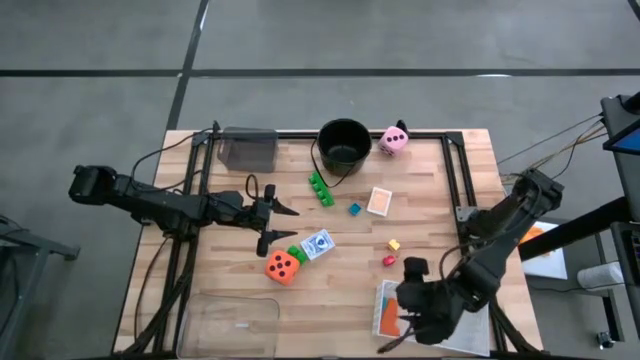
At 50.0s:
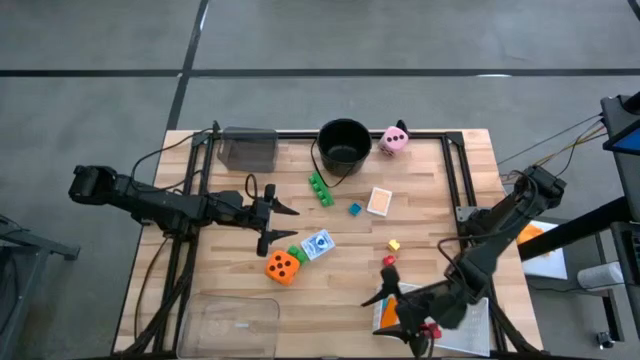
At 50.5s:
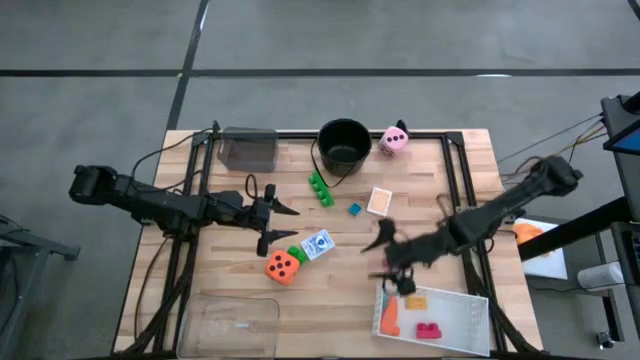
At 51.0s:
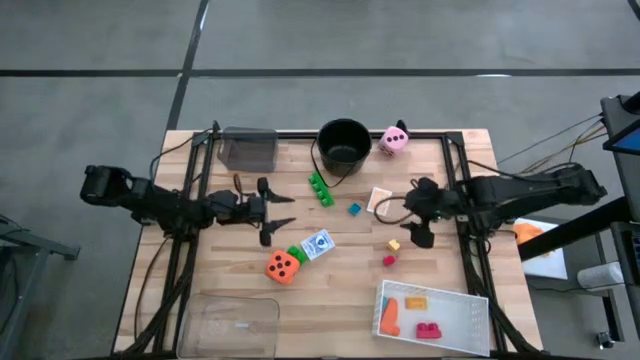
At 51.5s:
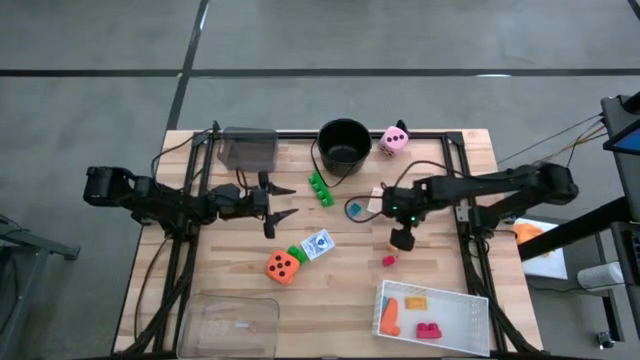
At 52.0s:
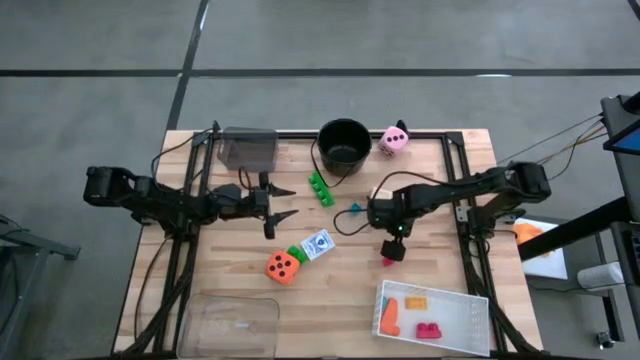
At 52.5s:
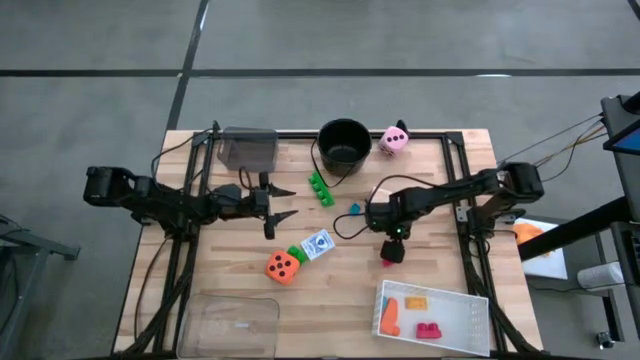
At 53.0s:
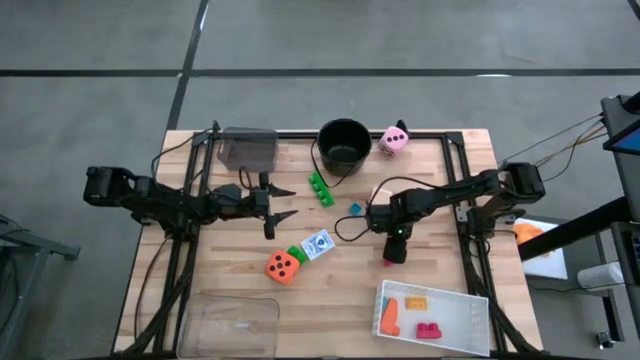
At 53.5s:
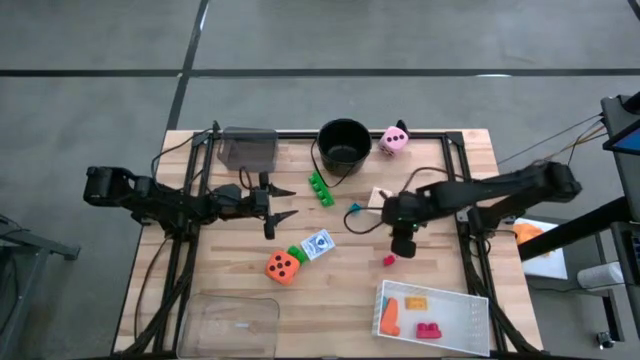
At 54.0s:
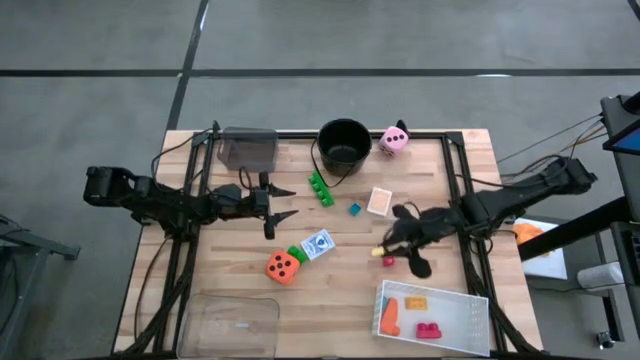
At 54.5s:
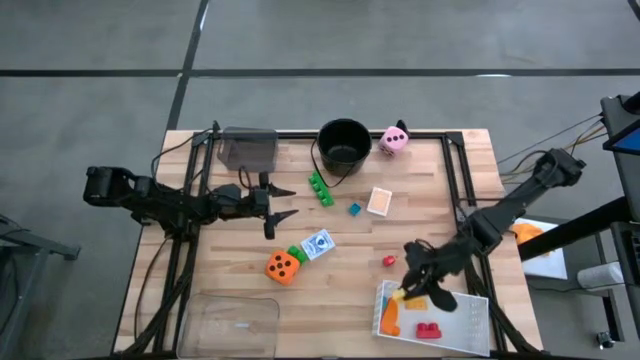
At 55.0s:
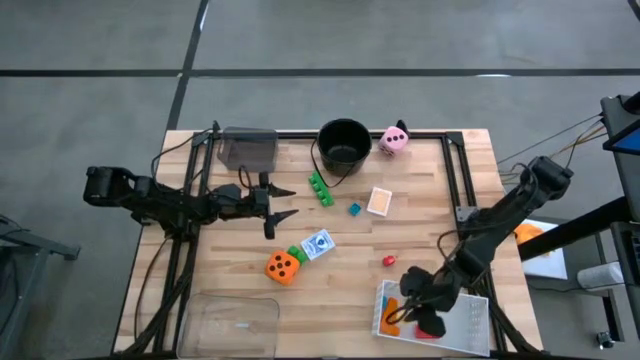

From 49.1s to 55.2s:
Task: Pick & Place Toys
Put the light yellow game piece into the white bin

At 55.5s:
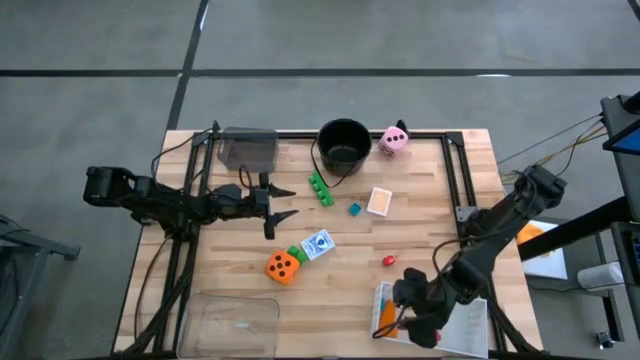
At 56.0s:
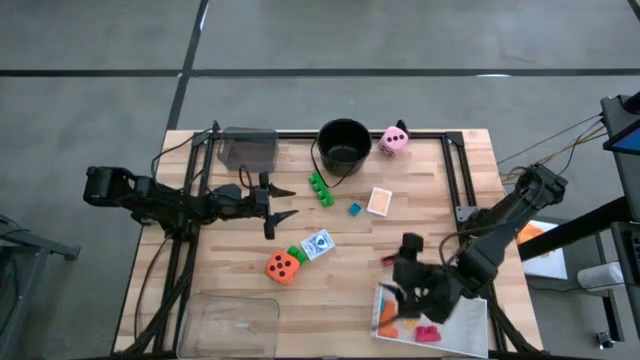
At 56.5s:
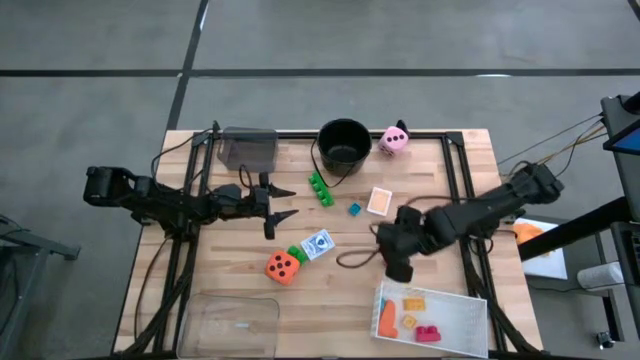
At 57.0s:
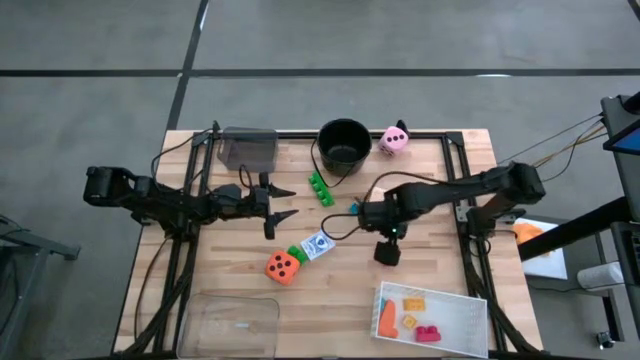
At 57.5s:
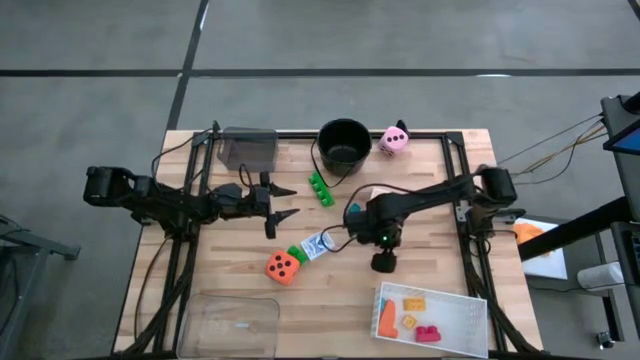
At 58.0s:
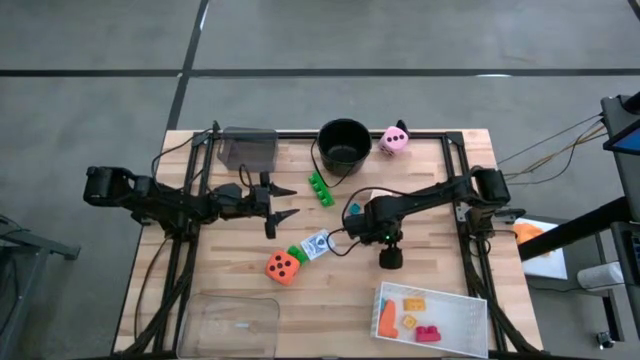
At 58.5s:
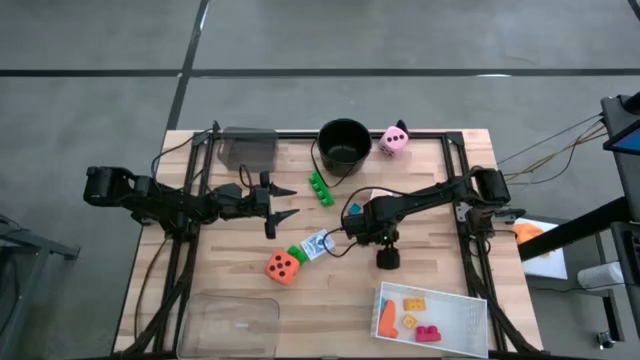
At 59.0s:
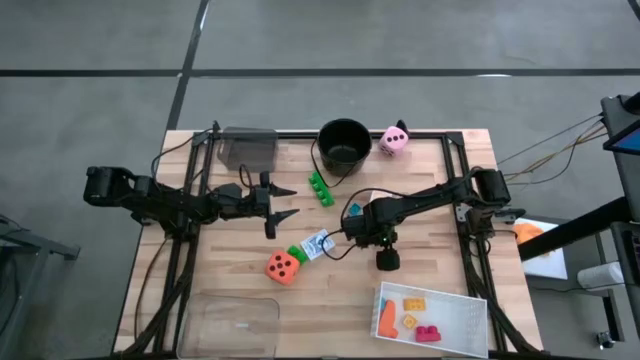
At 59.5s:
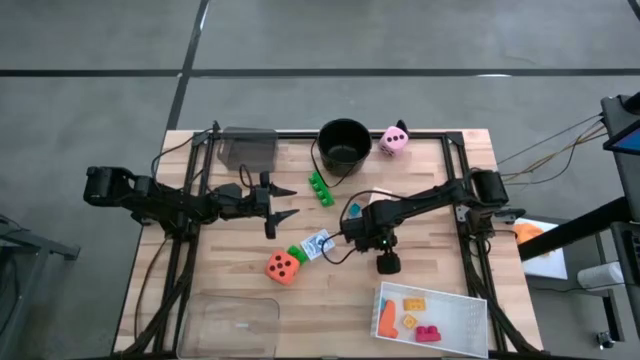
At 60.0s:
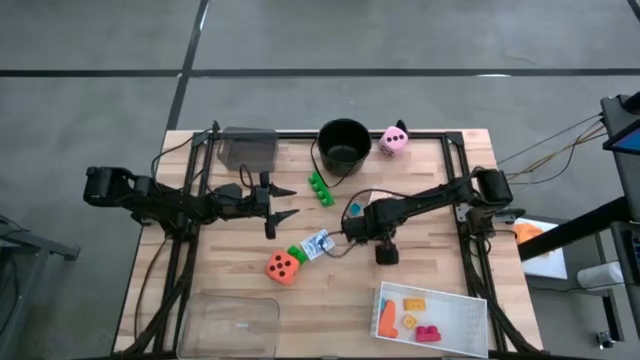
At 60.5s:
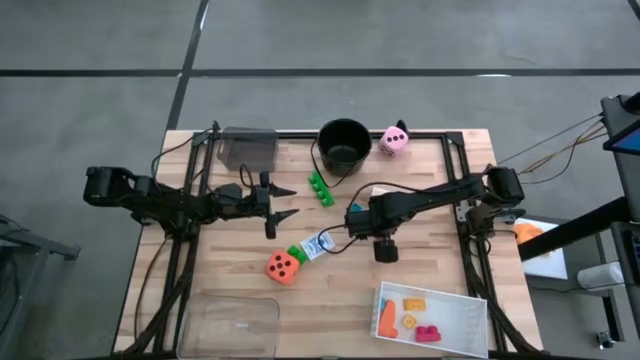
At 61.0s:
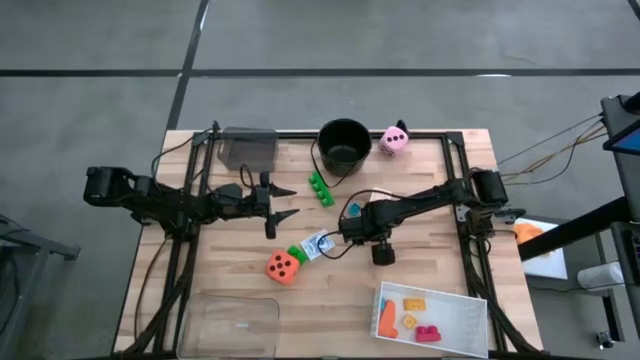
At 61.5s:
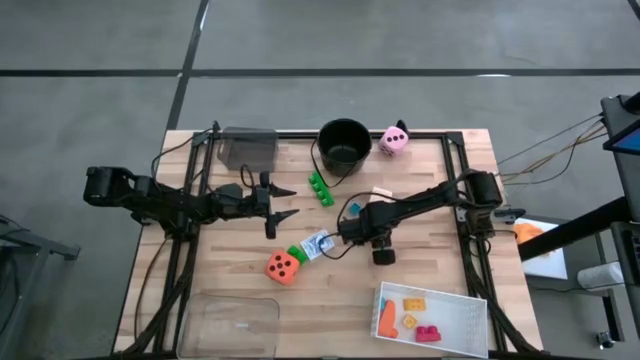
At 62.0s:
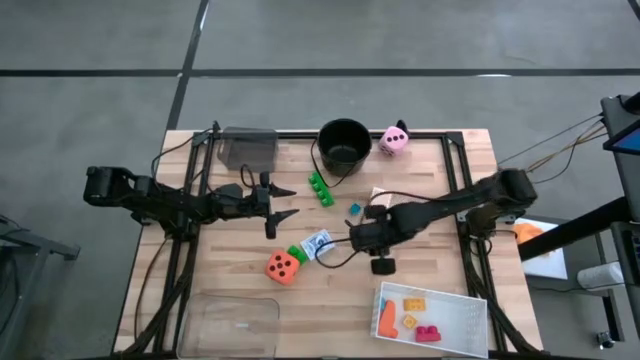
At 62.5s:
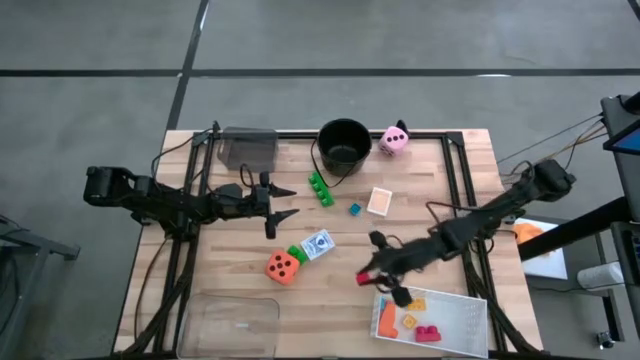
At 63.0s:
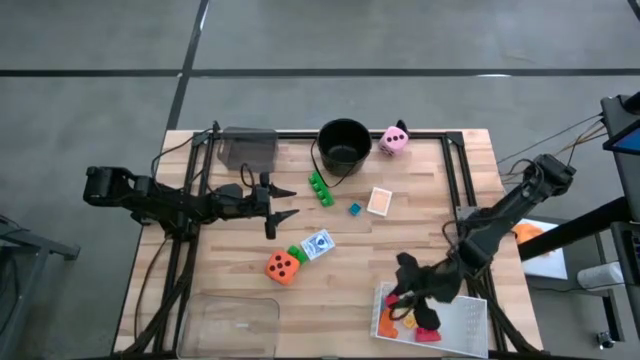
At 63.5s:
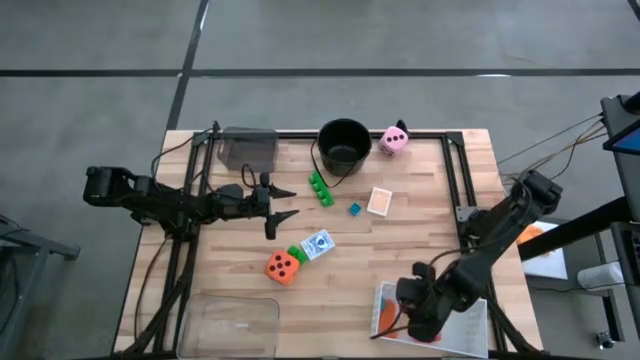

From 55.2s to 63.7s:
Put the red game piece into the white bin

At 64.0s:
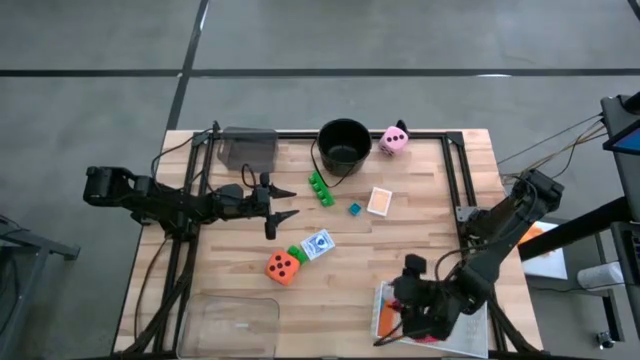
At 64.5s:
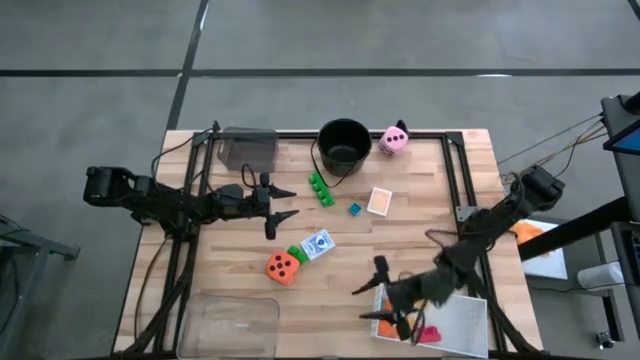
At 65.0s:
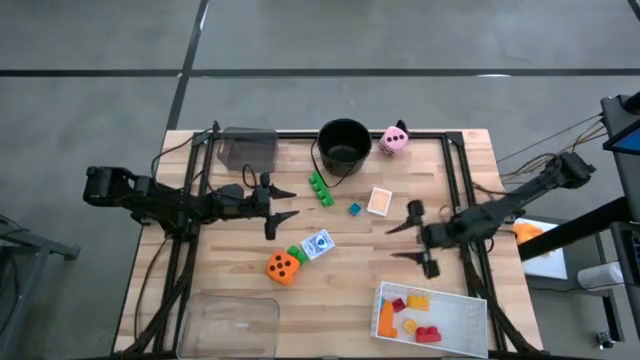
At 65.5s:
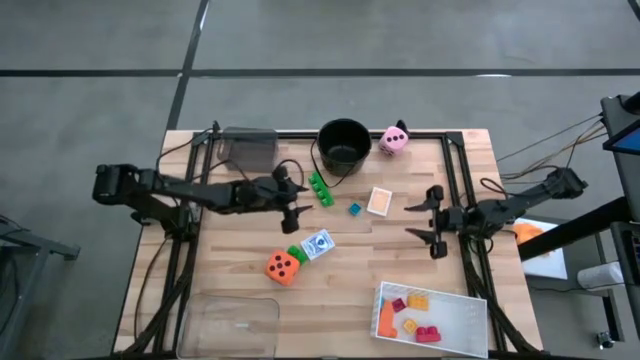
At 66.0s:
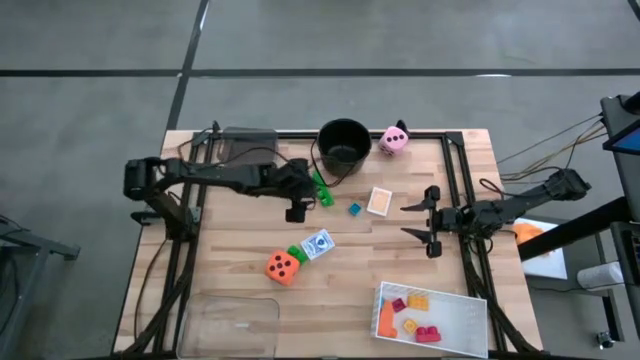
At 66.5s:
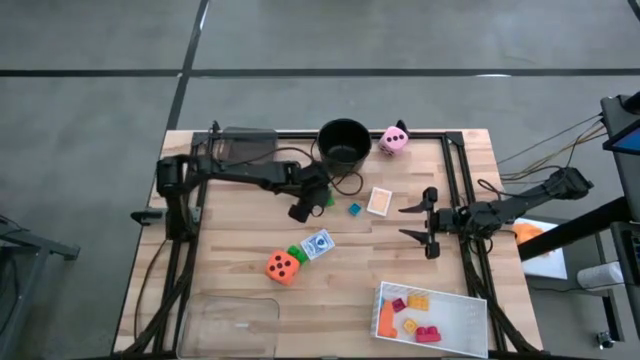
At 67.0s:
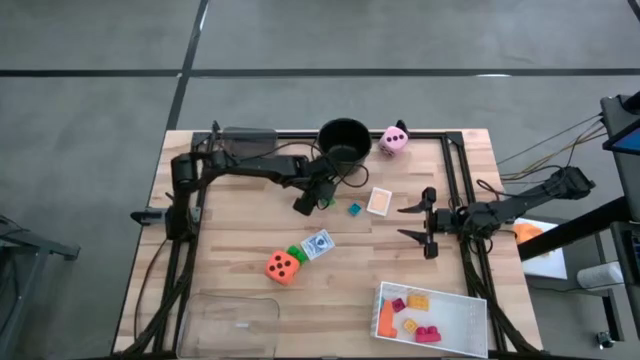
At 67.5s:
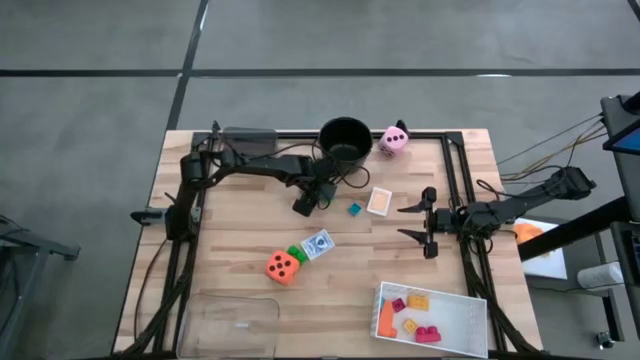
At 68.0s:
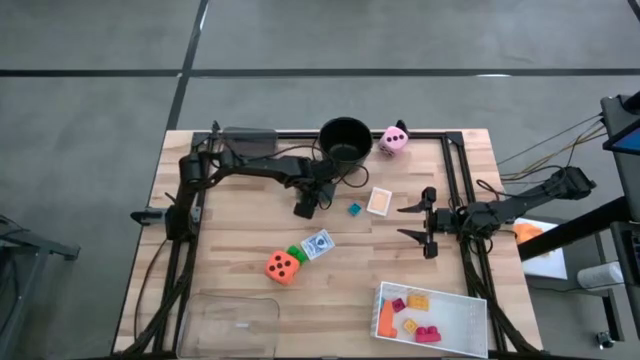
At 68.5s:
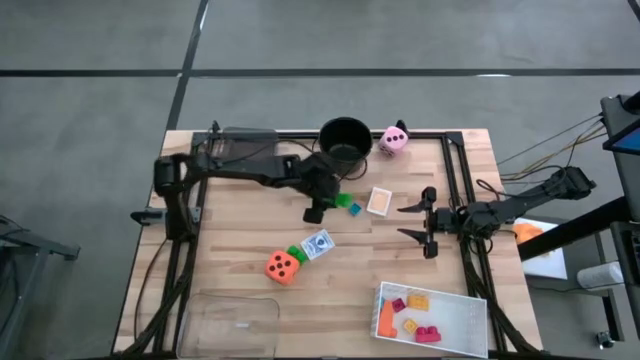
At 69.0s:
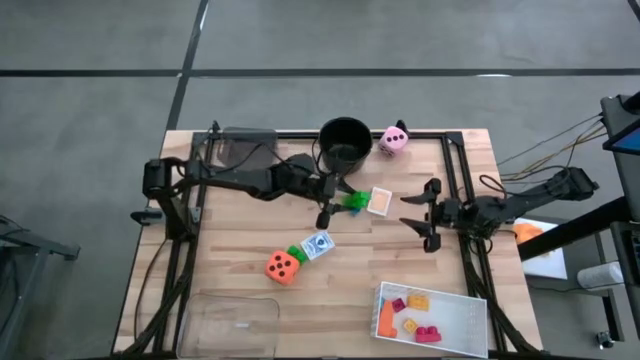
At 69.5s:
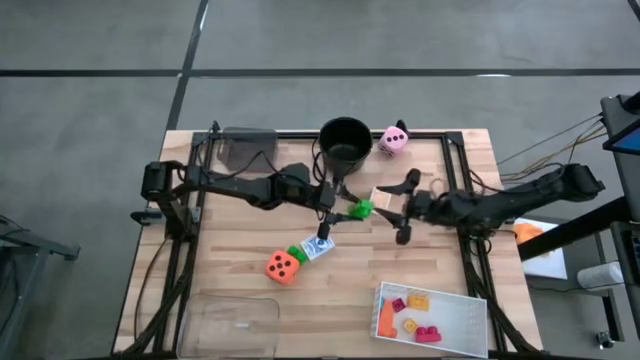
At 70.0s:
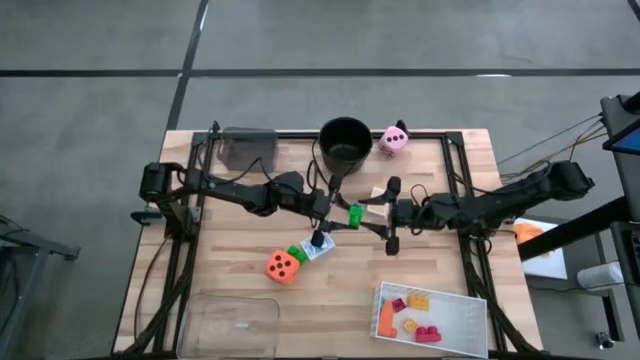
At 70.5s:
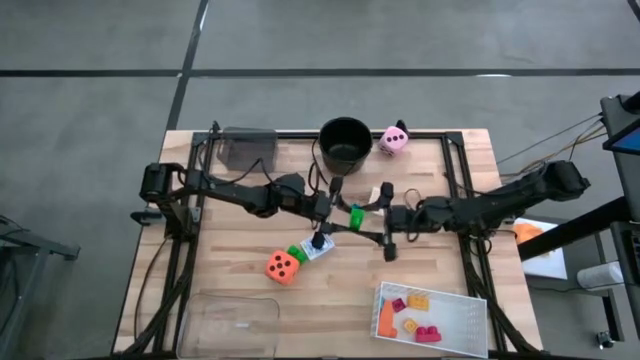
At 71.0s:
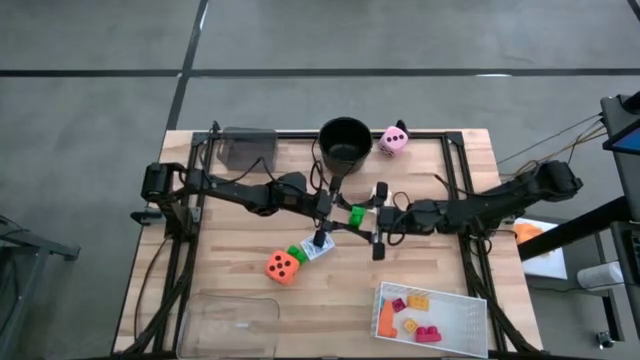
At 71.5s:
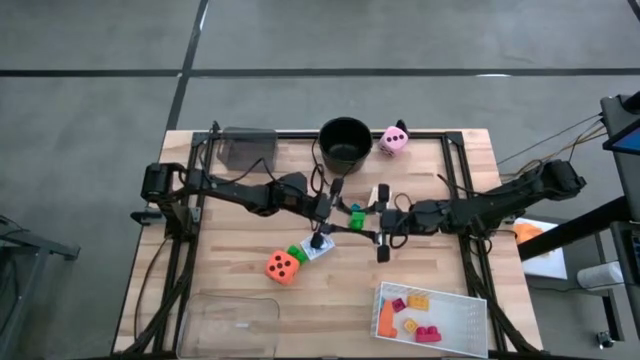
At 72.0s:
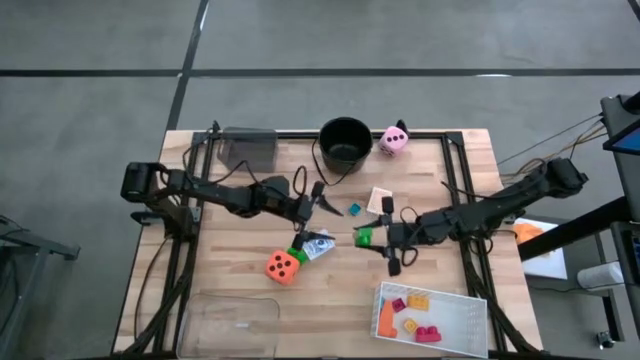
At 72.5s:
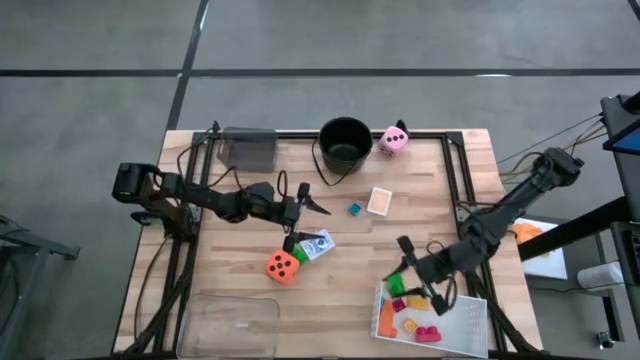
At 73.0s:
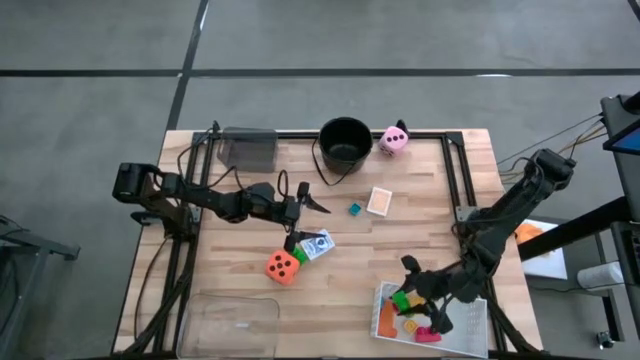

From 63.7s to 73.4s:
Put the top green game piece into the white bin
